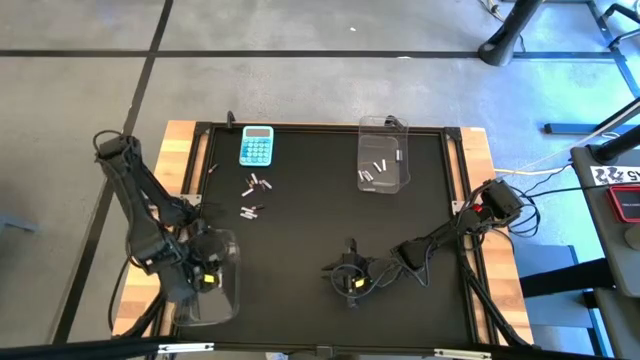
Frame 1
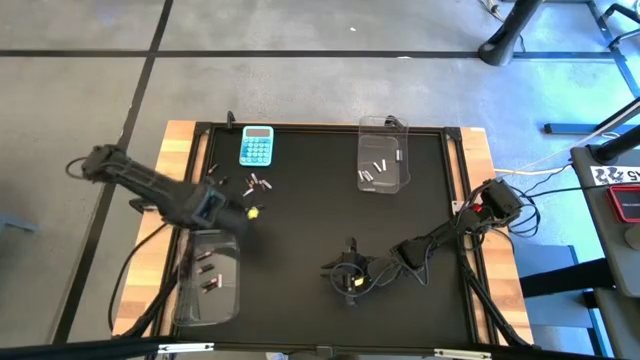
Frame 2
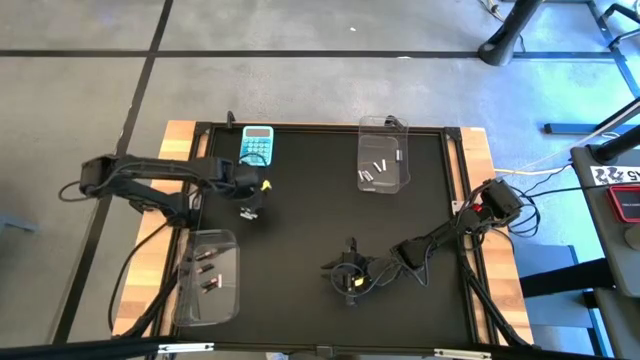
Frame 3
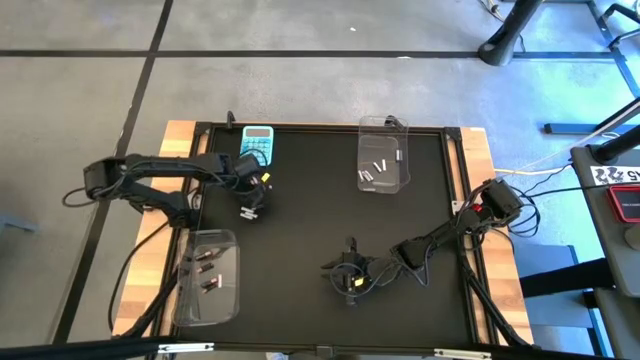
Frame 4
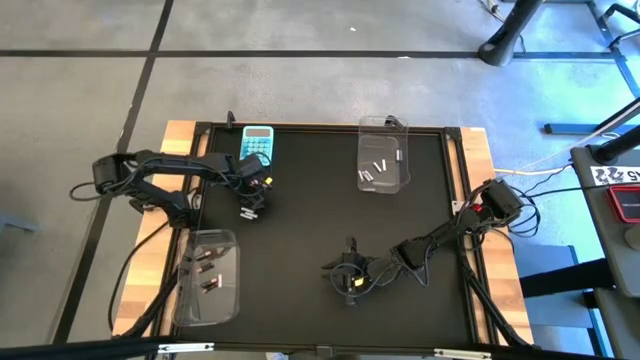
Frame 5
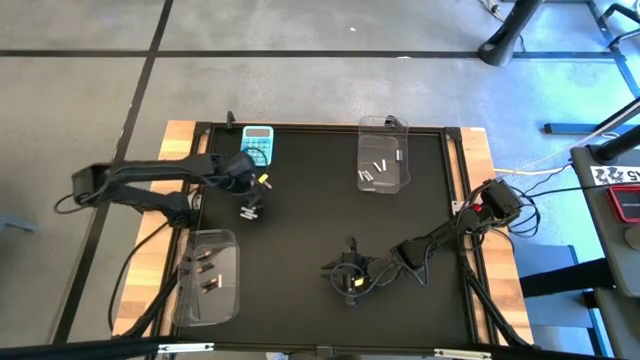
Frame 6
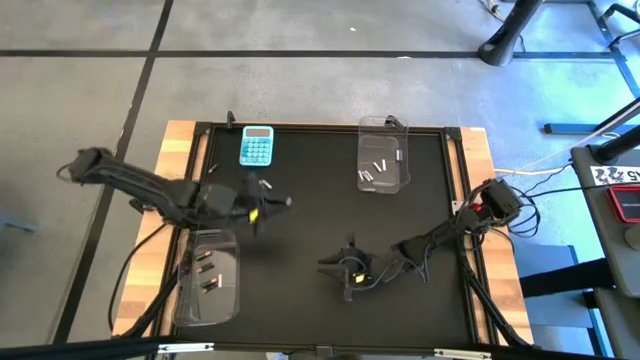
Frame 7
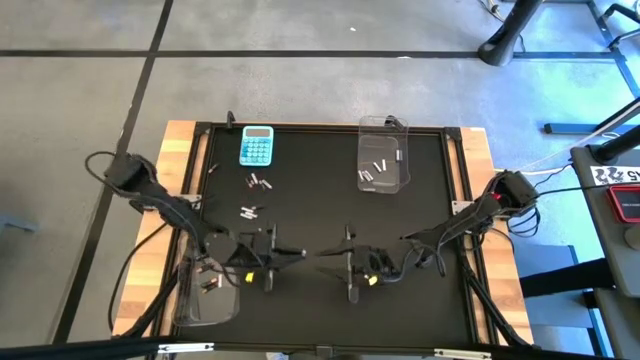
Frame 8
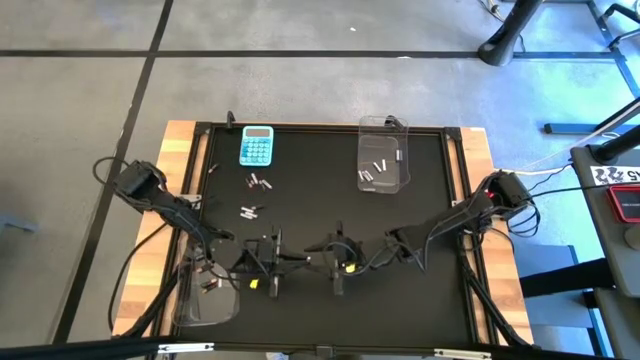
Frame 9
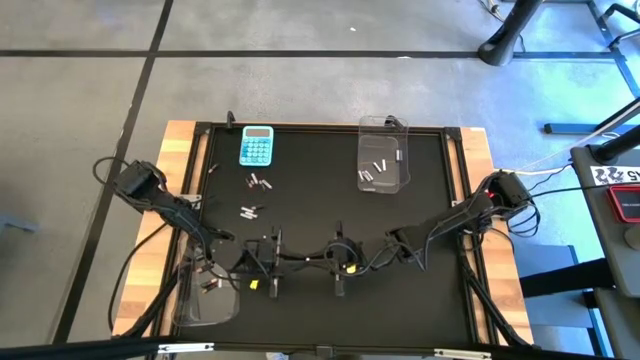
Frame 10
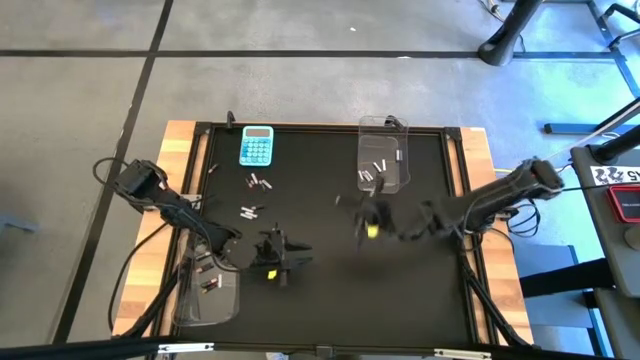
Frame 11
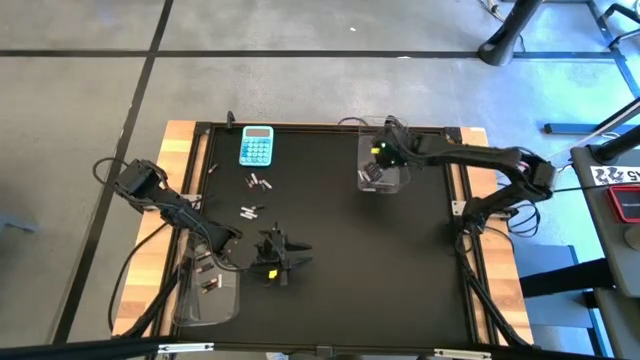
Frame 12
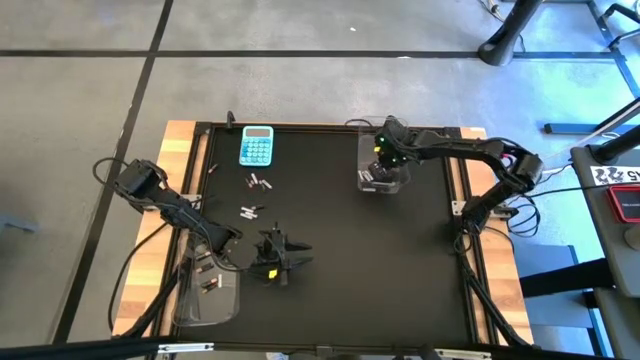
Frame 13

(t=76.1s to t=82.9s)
Task: Sort batteries
Put the white battery into the top transparent bin

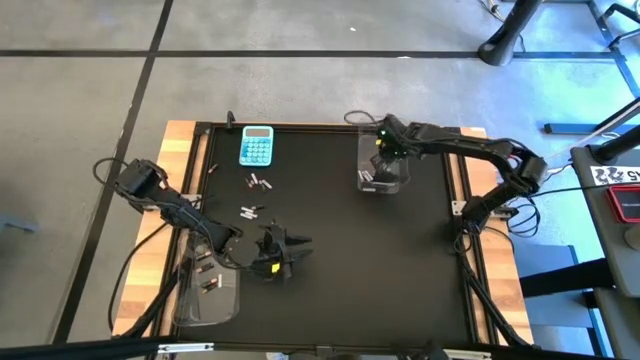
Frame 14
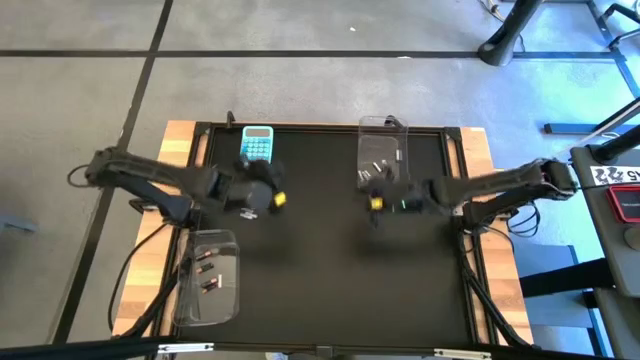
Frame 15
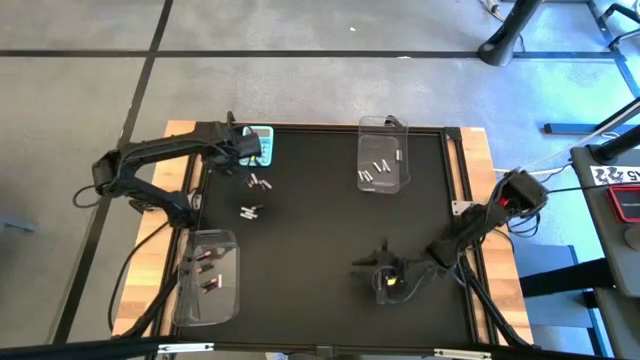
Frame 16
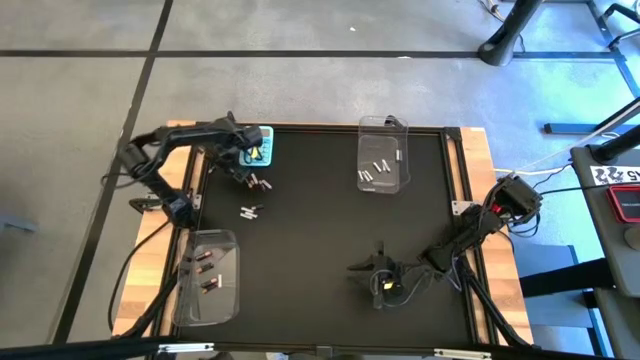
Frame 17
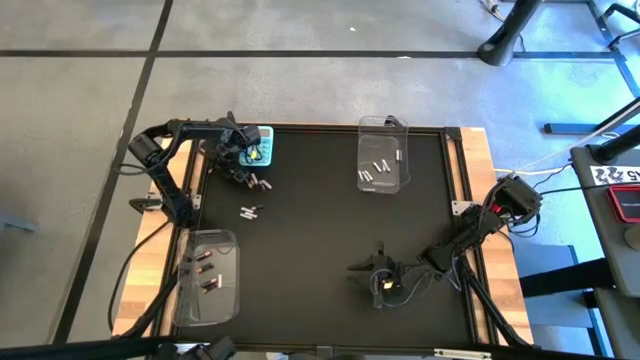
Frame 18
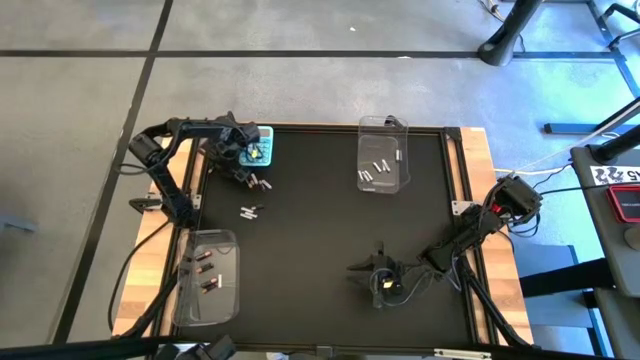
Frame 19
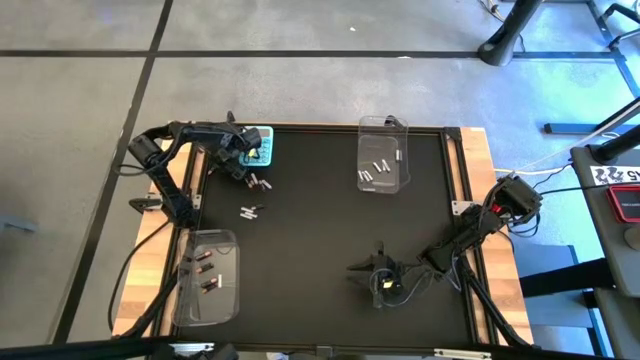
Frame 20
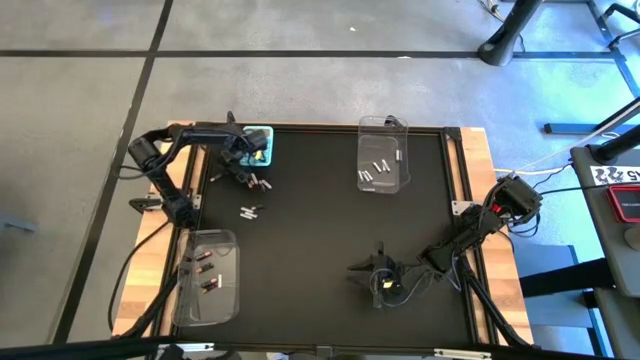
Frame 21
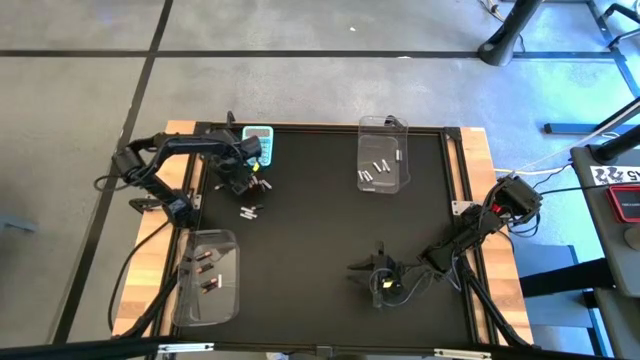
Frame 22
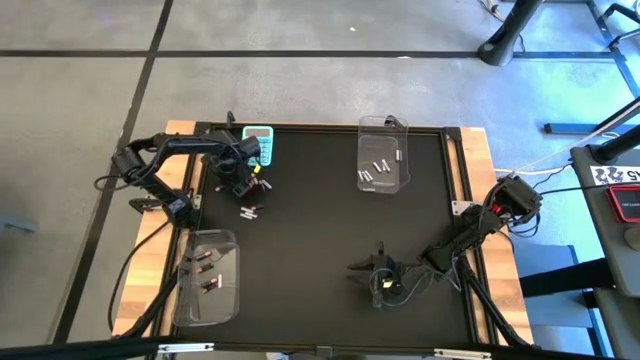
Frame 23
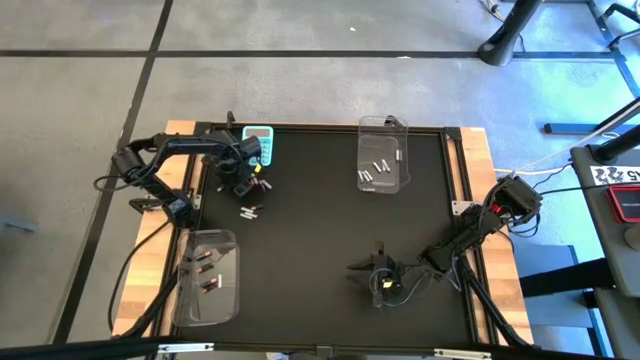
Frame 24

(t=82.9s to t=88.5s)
Put the black battery into the bottom transparent bin

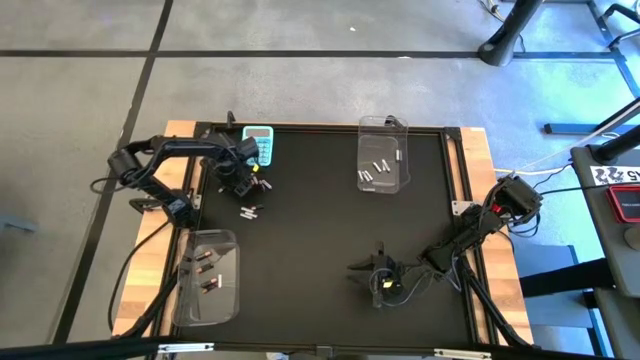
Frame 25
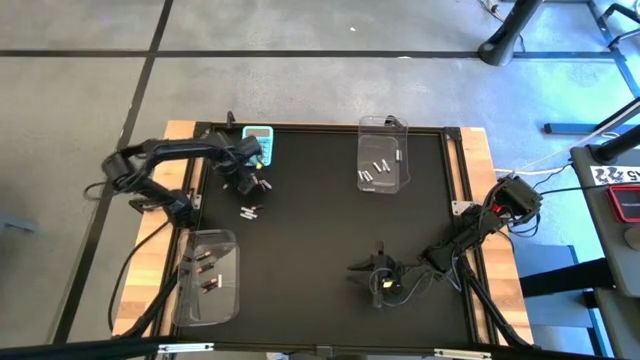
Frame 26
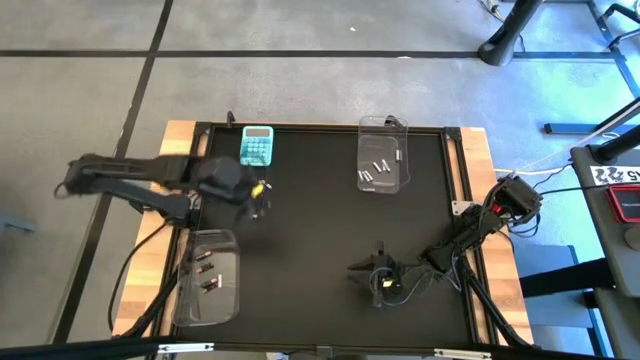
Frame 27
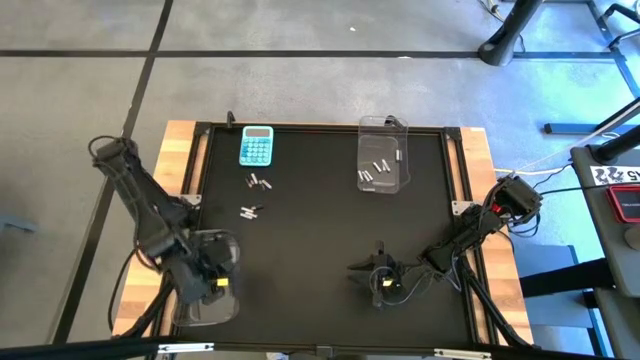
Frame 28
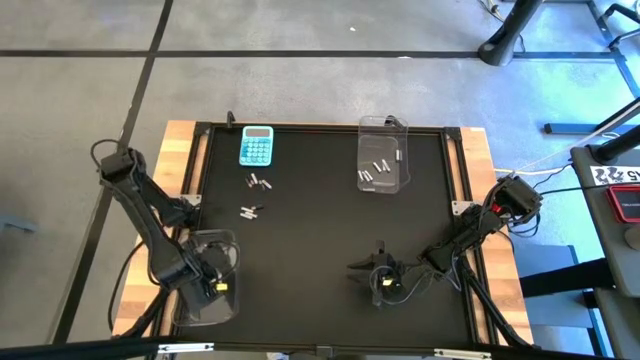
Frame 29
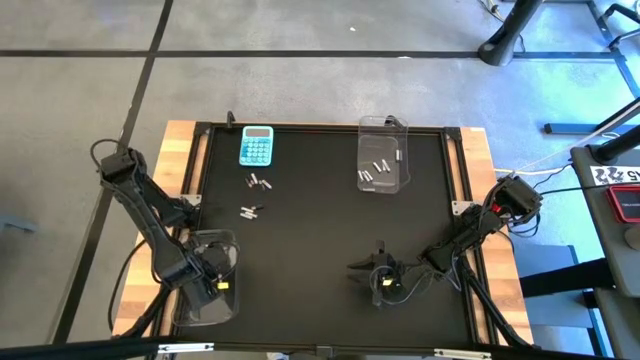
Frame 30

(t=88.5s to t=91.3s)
Put the black battery into the bottom transparent bin

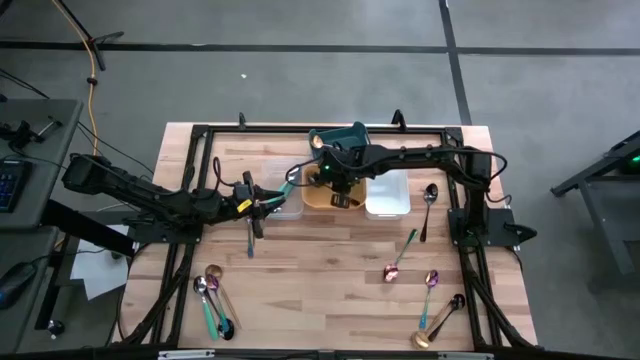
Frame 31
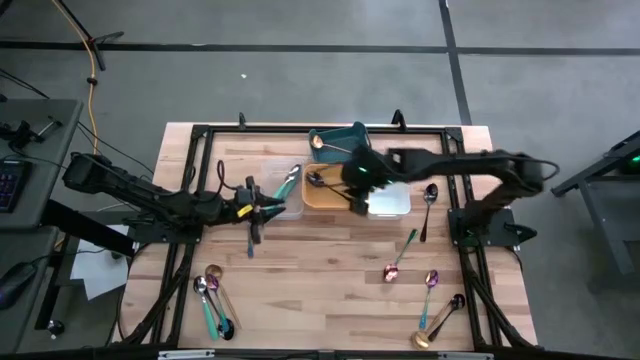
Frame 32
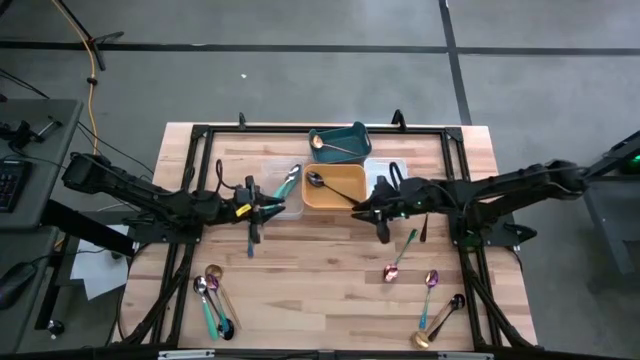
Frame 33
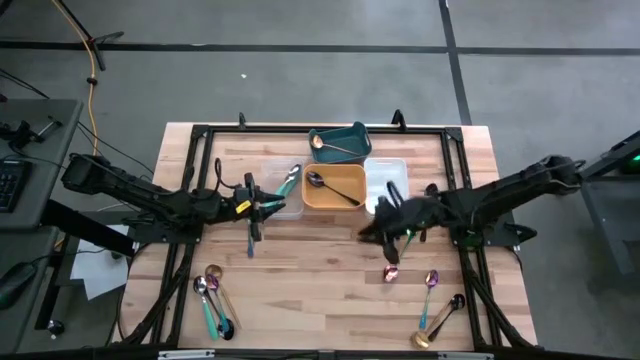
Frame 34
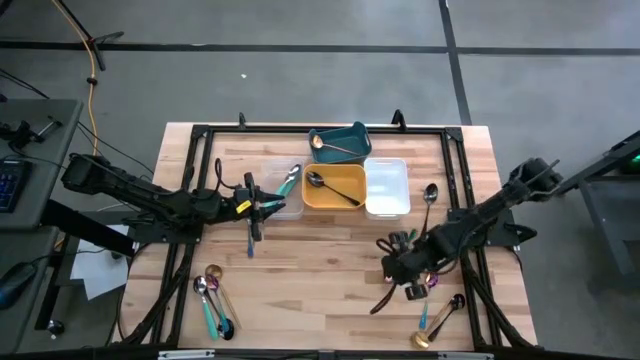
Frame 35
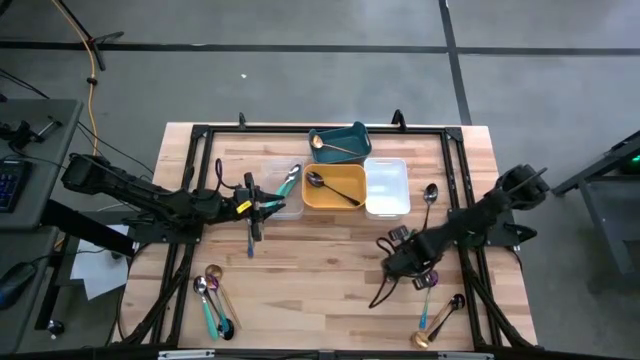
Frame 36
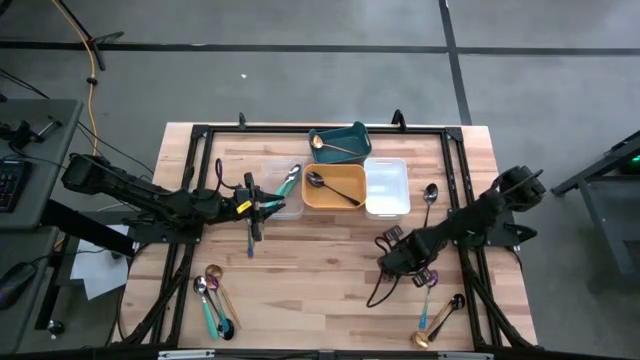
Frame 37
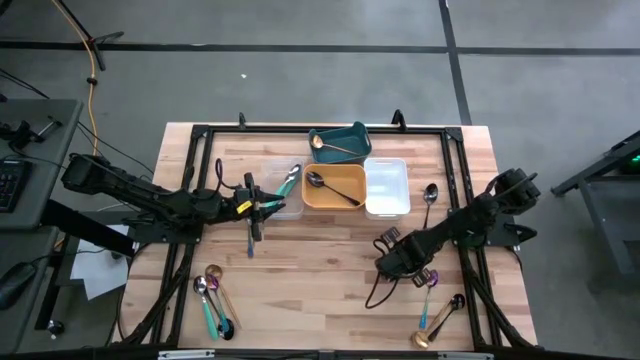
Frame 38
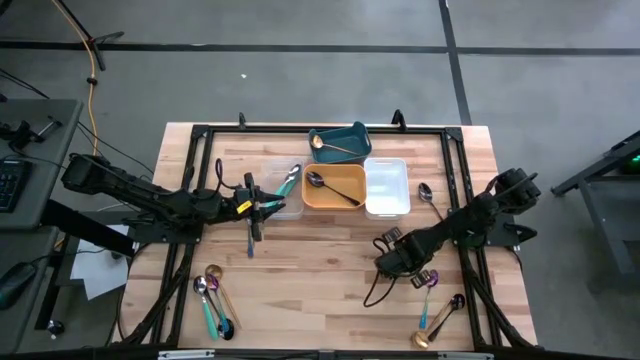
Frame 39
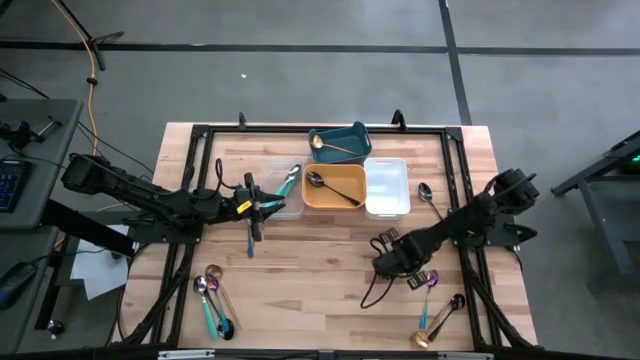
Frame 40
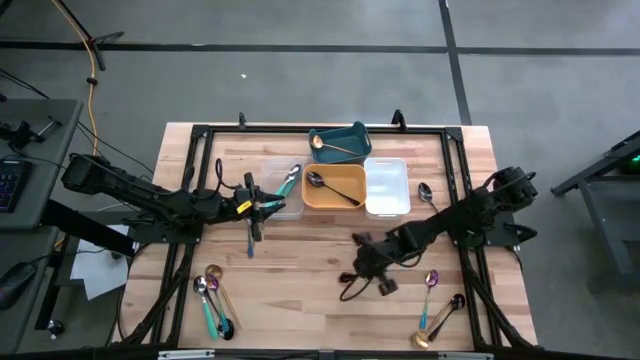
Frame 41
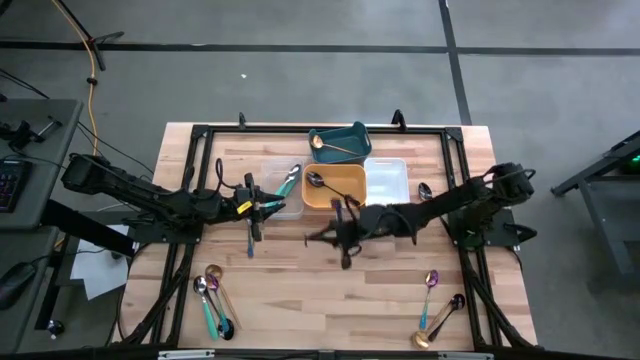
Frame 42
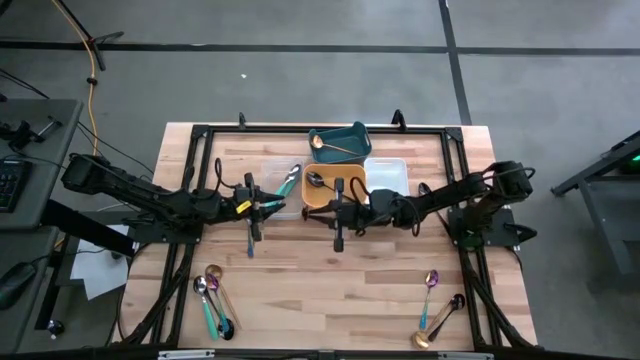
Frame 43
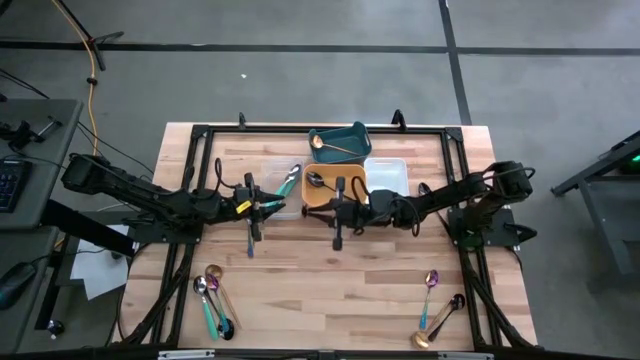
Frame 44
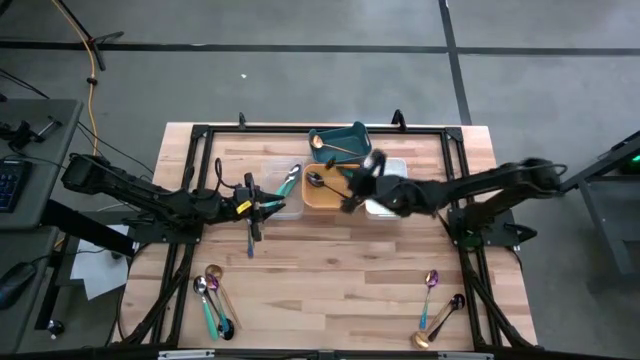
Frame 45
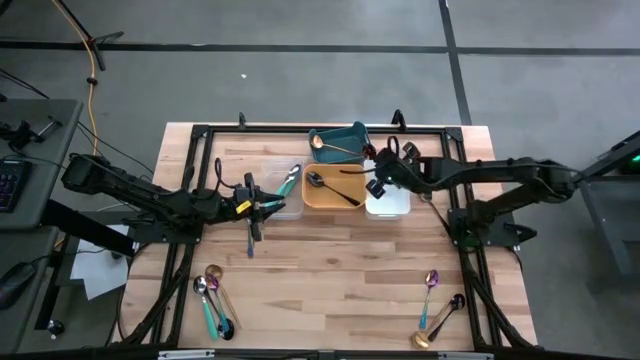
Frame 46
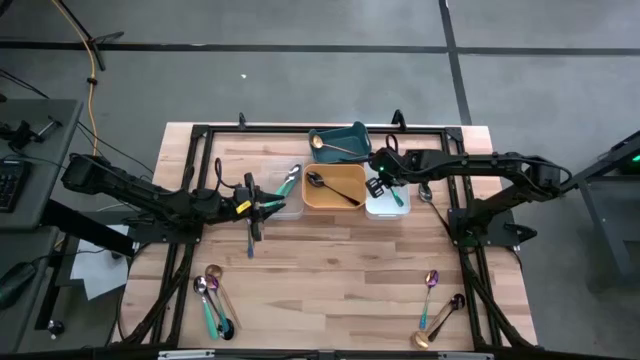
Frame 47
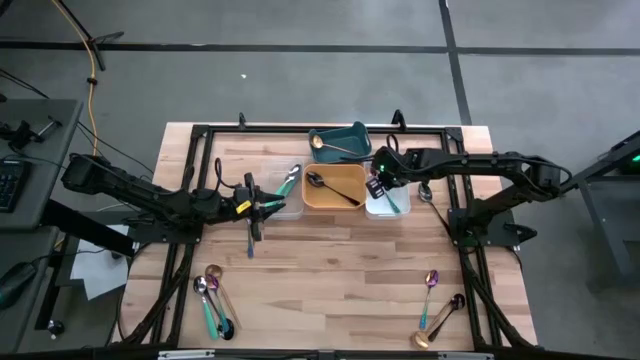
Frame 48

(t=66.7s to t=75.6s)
Task: Sort silverware by color (type)
Put the distorted-color spoon into the white bin
